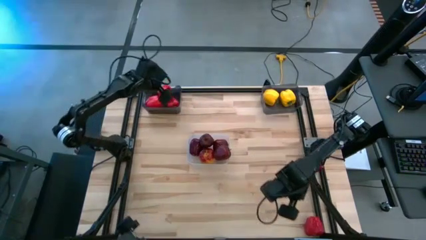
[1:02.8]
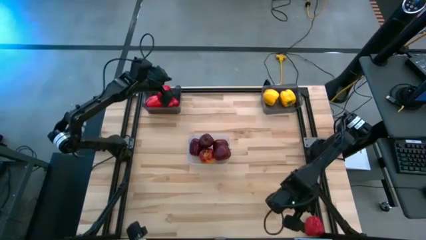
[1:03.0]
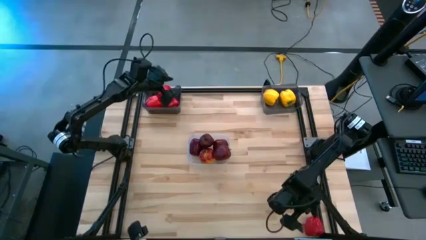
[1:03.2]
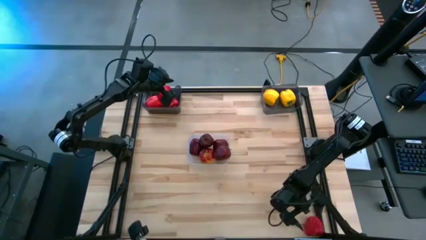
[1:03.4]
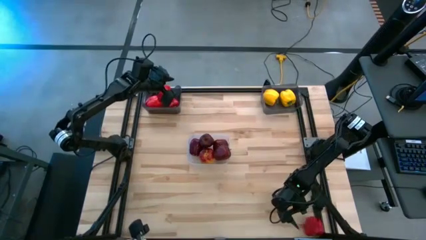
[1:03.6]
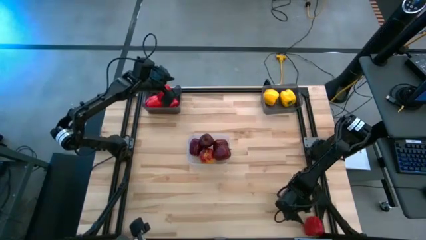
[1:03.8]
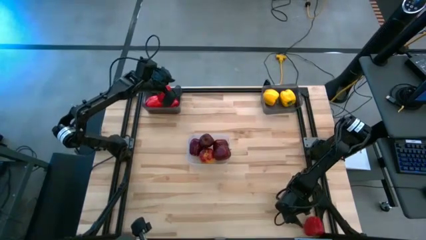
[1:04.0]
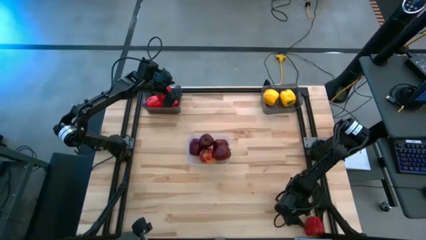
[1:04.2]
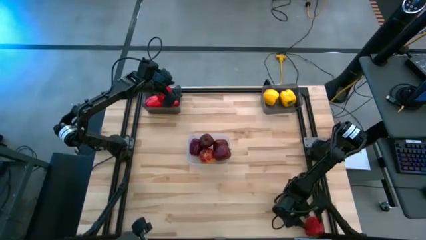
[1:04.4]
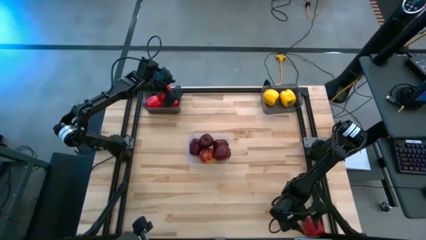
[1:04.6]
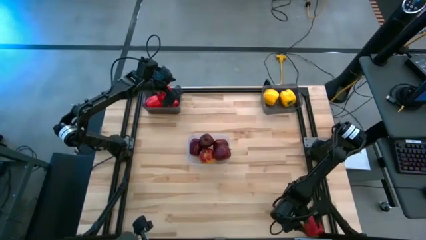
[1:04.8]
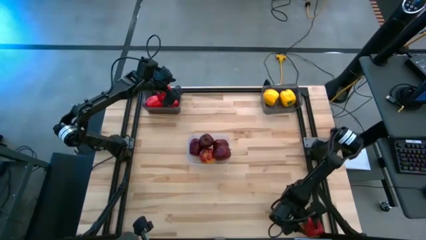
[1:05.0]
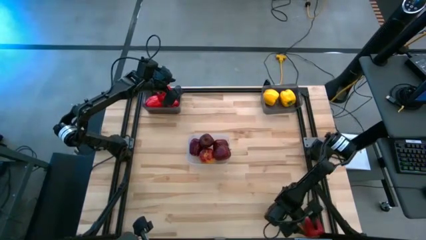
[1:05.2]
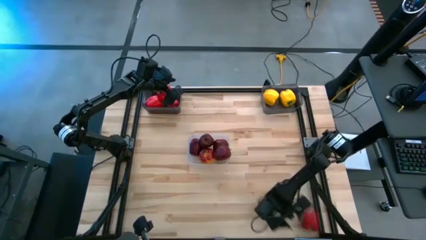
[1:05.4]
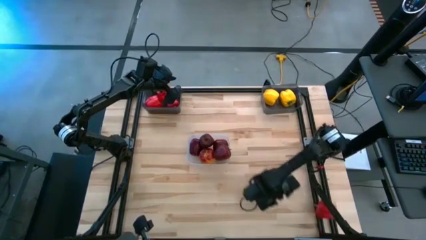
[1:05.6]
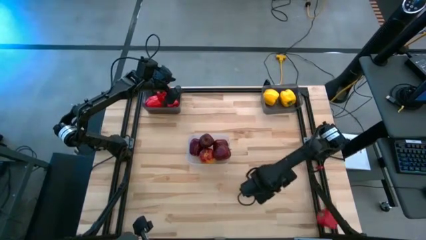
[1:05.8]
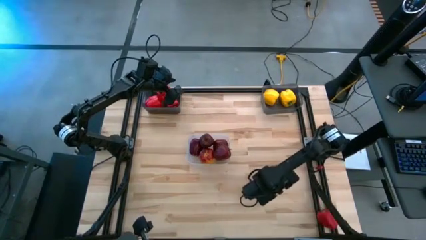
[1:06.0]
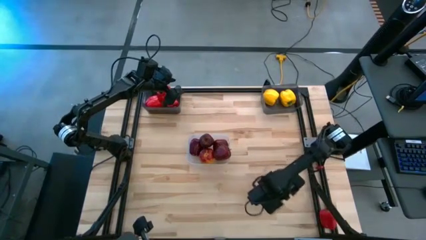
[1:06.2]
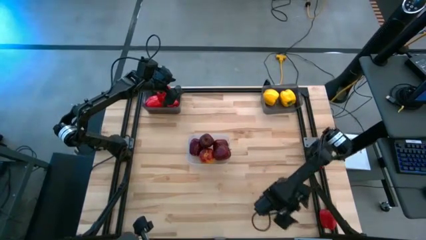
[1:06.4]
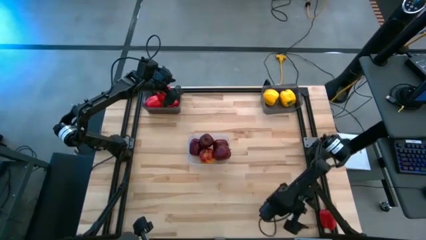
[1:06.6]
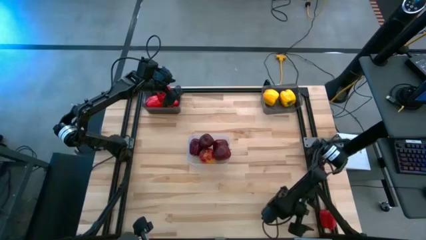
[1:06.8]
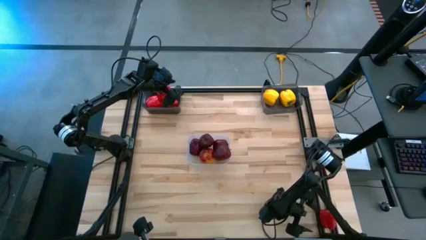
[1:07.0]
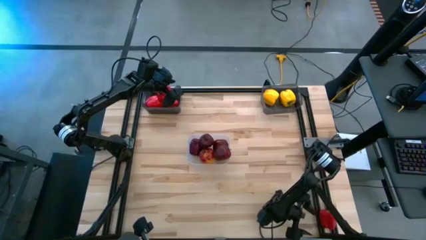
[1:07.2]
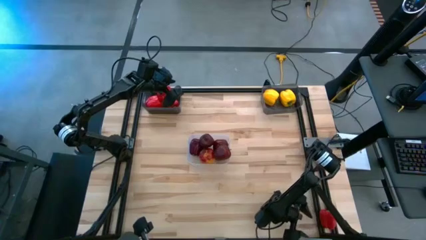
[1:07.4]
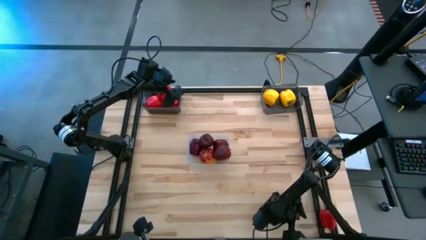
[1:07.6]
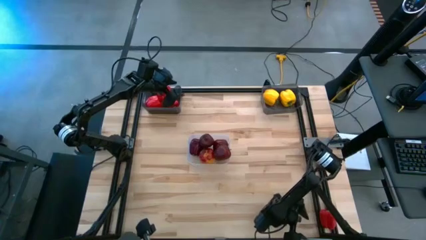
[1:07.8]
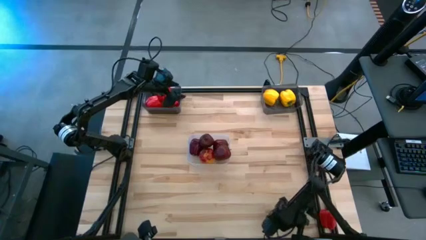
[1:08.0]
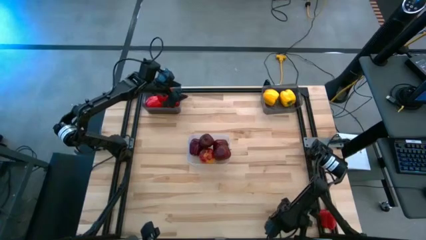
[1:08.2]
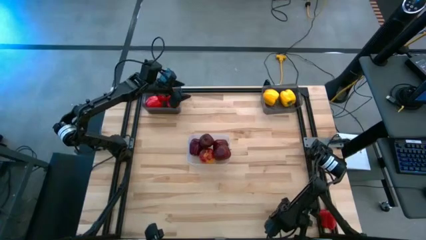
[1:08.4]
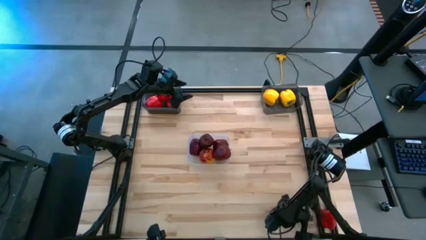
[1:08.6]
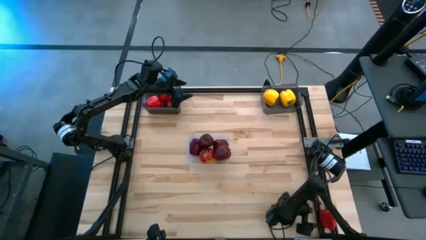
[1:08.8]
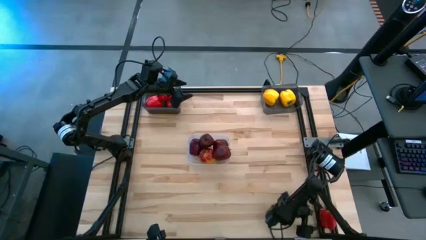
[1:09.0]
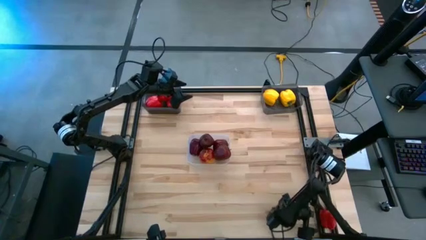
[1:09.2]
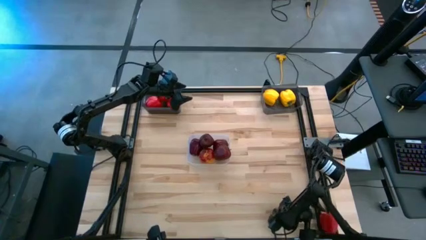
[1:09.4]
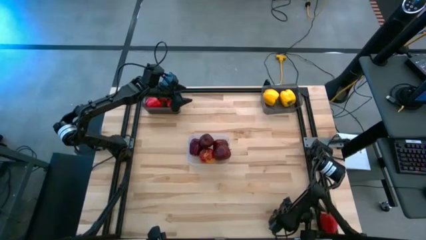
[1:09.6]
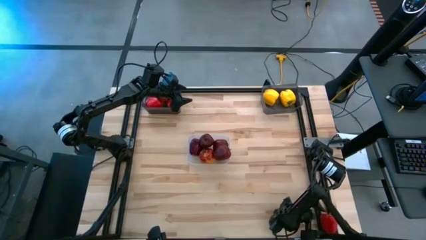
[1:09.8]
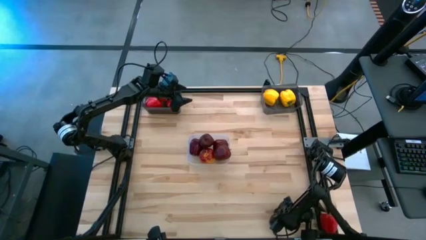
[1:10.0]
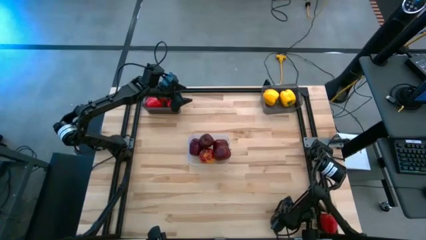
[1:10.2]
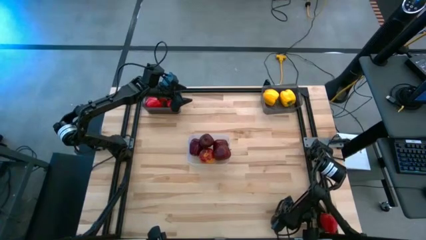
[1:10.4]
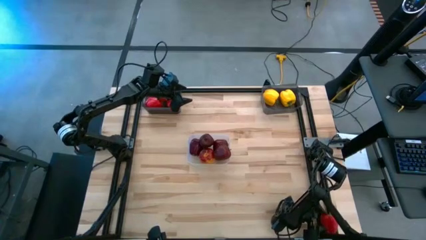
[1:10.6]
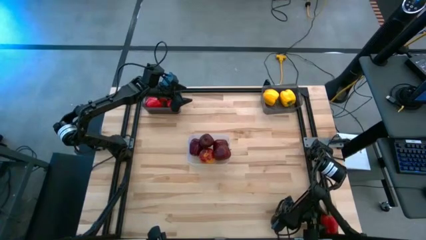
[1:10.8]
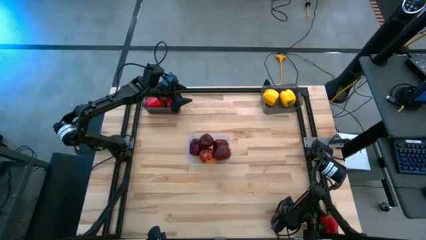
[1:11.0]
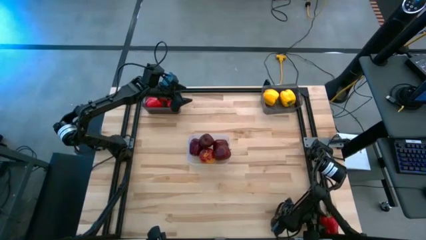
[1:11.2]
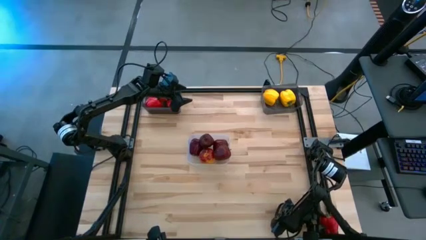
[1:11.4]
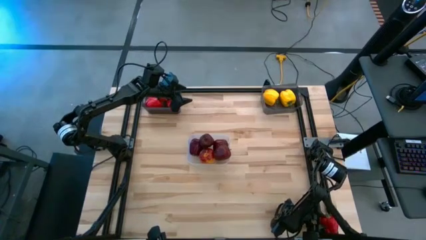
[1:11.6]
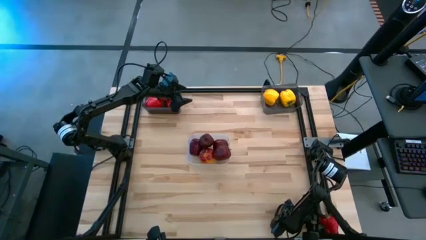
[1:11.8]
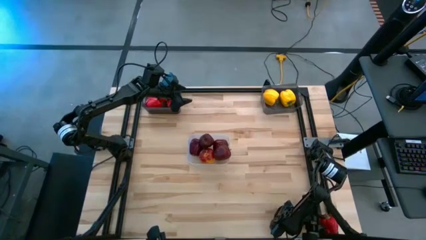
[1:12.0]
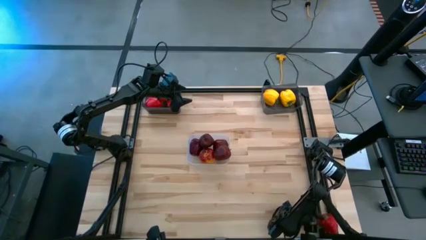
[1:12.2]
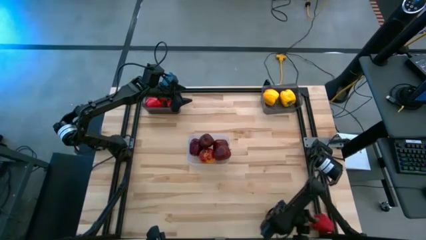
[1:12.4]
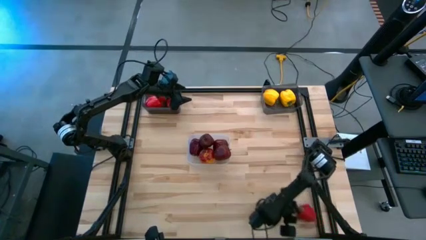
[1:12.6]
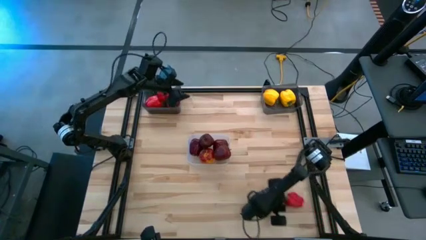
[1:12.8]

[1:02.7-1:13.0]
Task: Sort produce into baskets
Put the red bell pepper into the left black bin

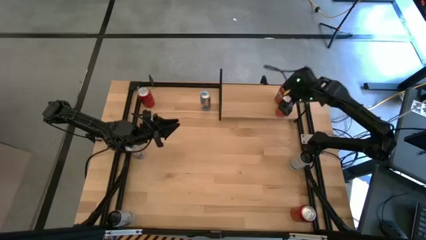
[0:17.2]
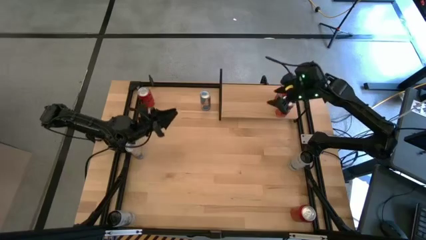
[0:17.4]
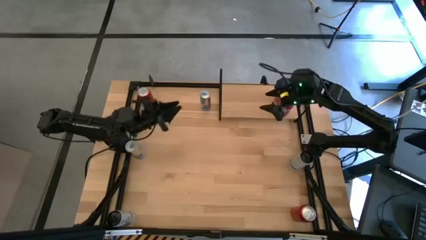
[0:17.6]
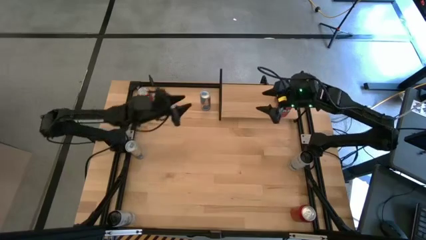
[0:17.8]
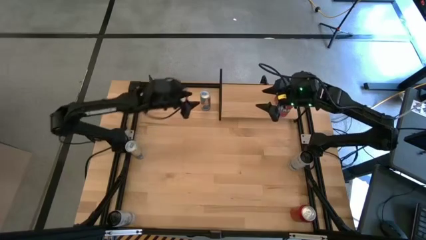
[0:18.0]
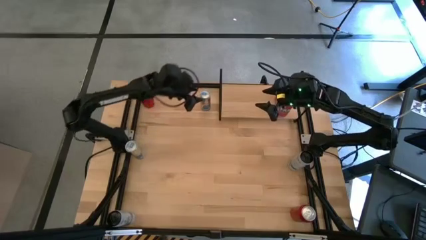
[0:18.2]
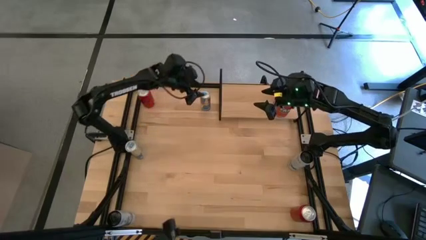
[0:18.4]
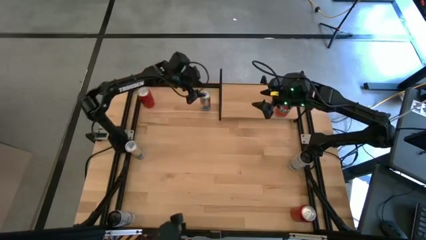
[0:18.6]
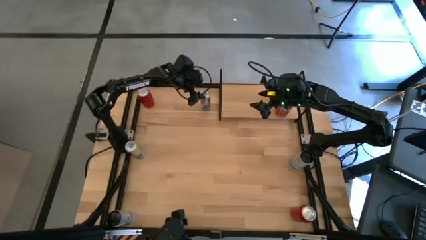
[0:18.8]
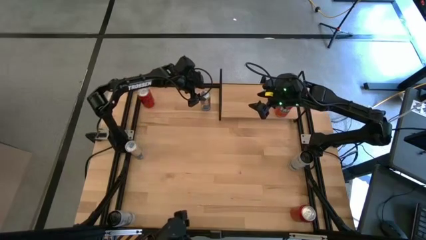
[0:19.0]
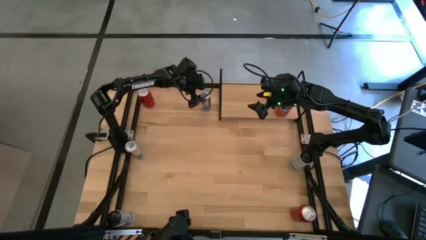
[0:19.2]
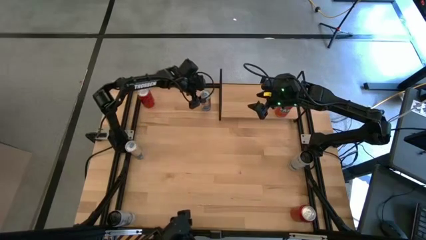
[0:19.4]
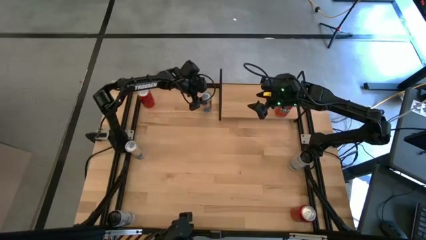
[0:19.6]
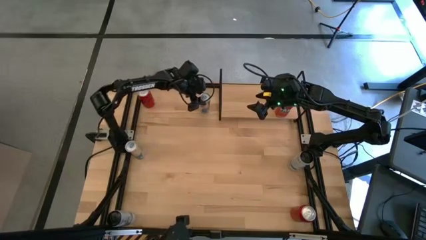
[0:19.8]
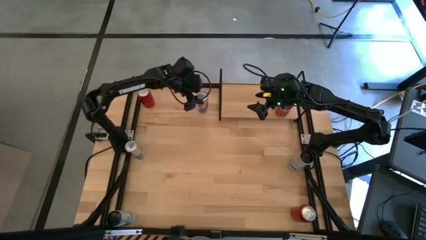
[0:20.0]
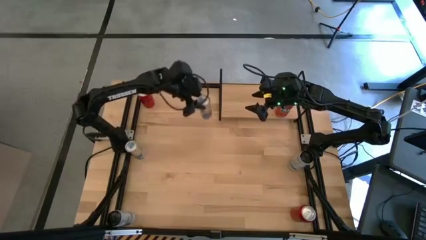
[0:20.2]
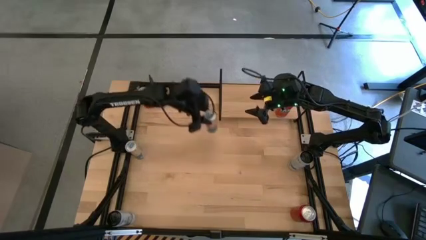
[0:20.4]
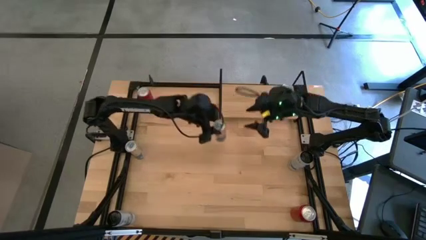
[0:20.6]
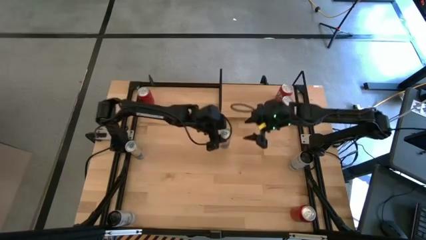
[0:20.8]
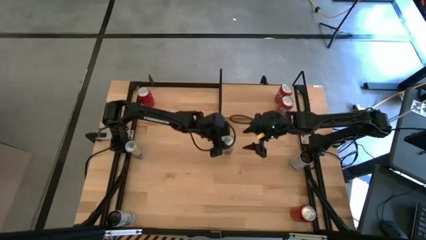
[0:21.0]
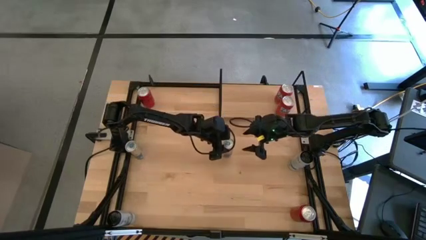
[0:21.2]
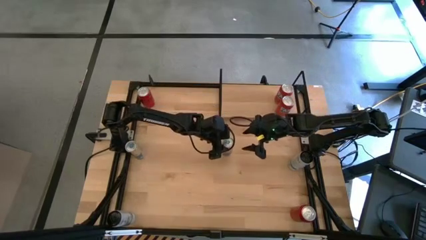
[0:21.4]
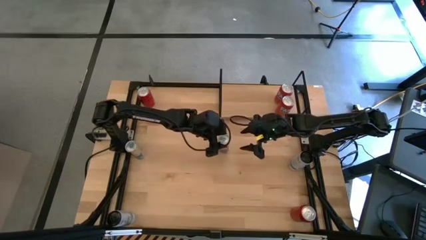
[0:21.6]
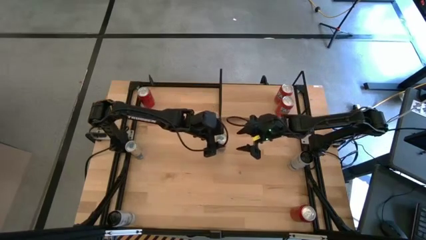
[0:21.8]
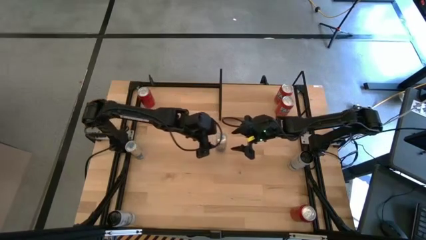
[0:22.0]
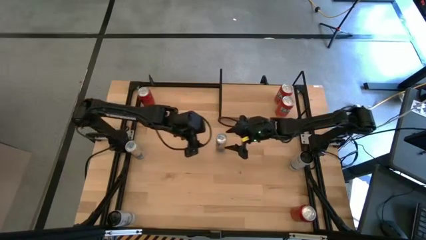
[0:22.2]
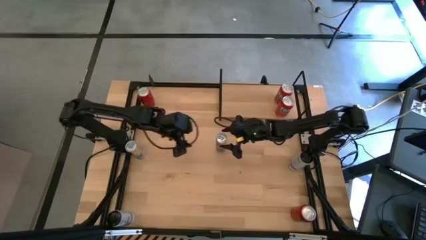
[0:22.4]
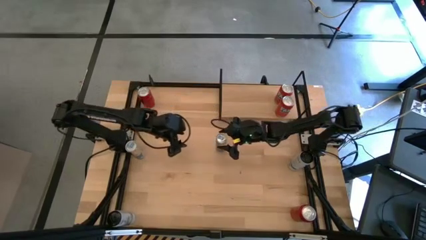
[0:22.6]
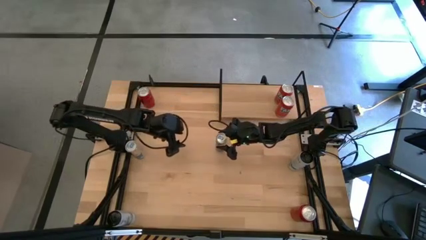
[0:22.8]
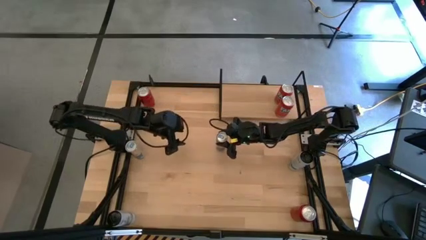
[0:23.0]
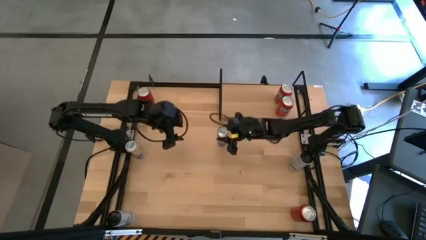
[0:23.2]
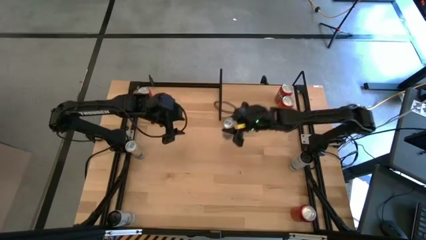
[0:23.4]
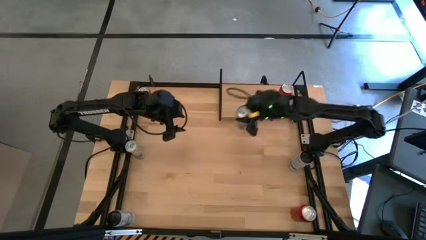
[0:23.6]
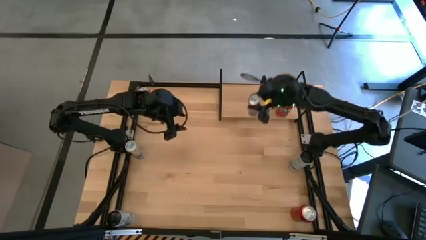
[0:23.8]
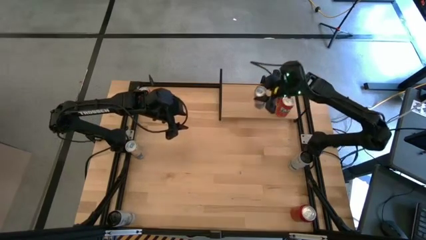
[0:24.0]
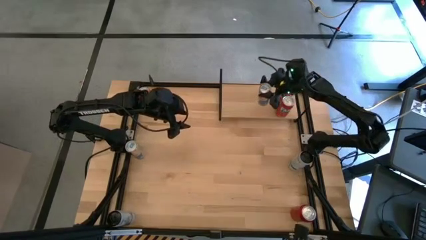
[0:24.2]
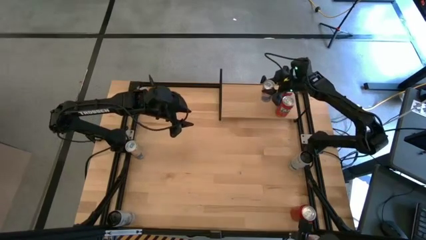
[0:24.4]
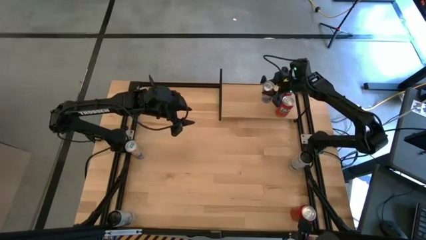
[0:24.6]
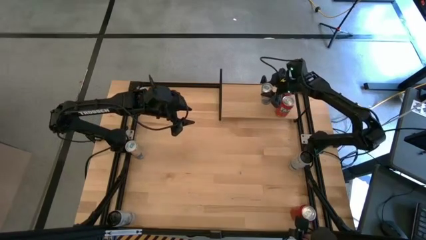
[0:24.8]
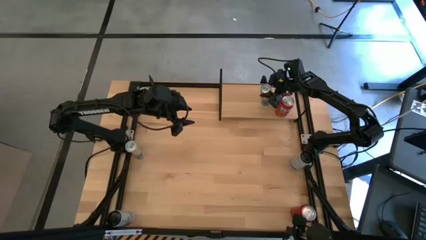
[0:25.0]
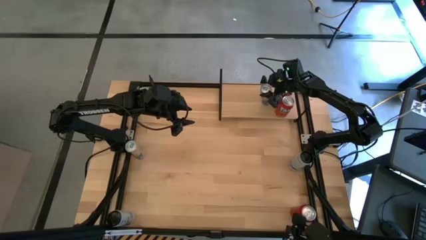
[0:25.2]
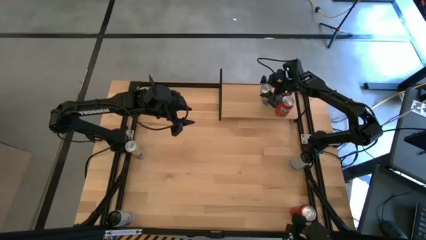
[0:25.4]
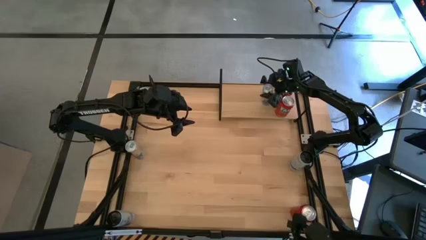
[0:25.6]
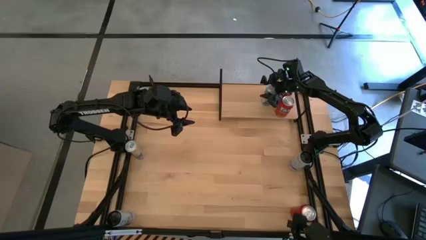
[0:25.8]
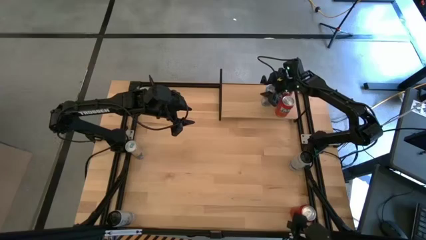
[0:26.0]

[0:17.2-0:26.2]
Task: Place canned beverage on shelf
Put the top blue soda can on the shelf
